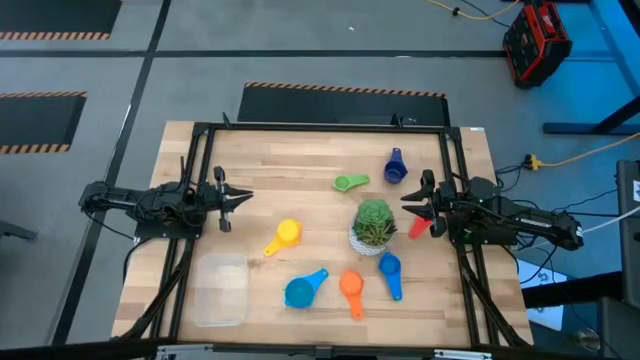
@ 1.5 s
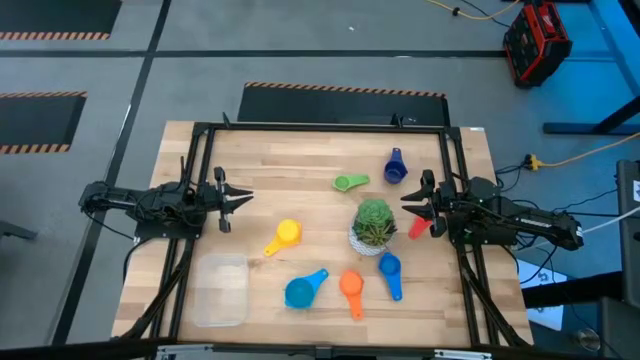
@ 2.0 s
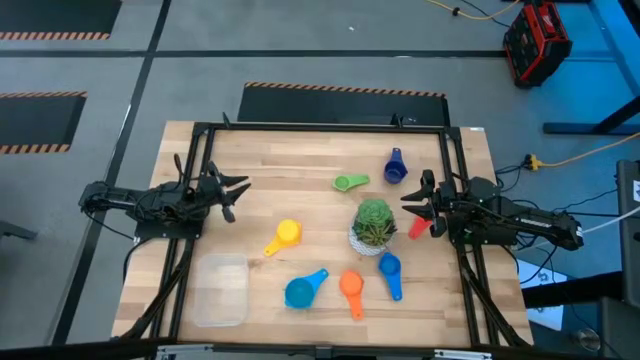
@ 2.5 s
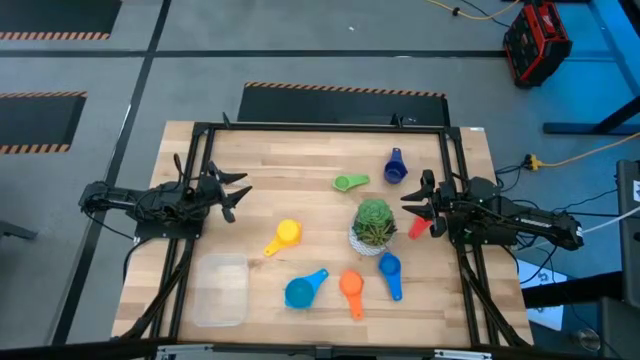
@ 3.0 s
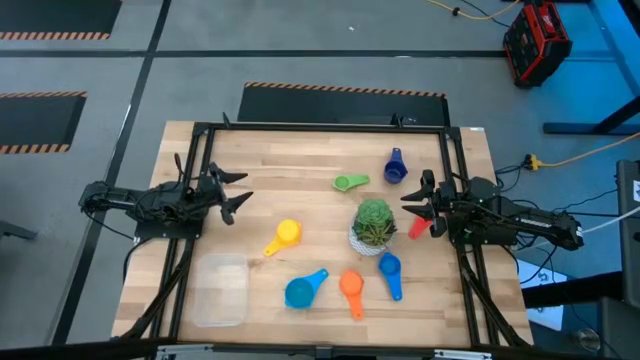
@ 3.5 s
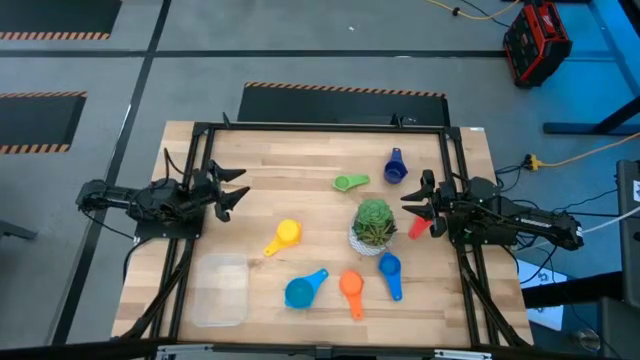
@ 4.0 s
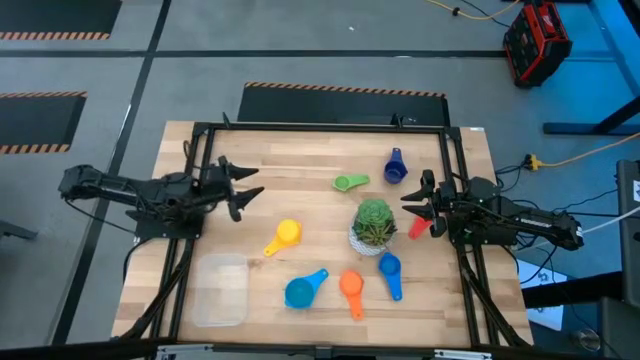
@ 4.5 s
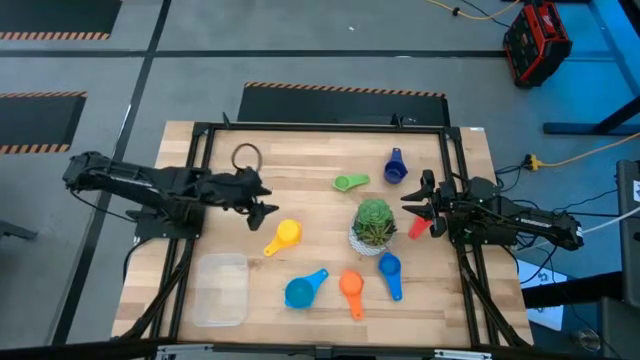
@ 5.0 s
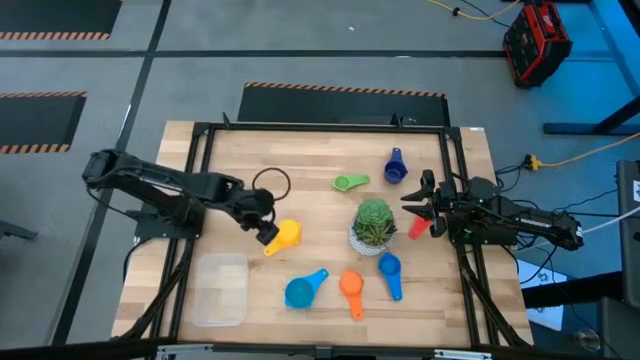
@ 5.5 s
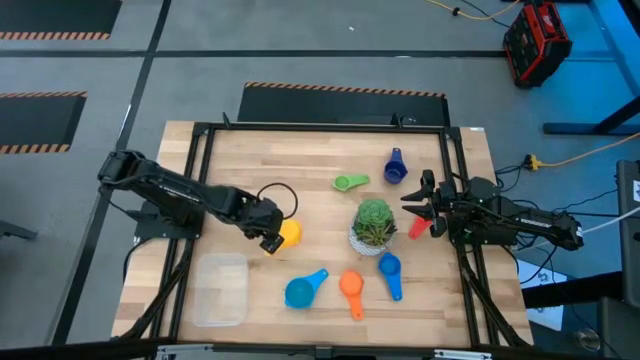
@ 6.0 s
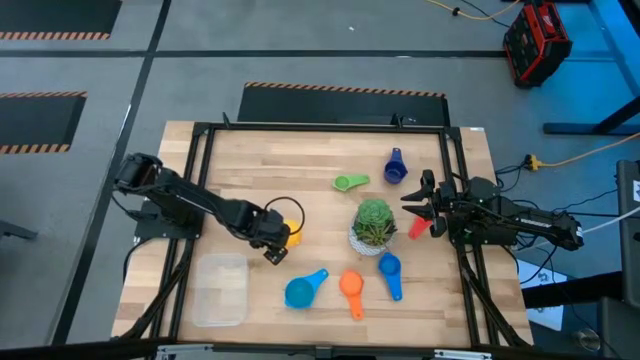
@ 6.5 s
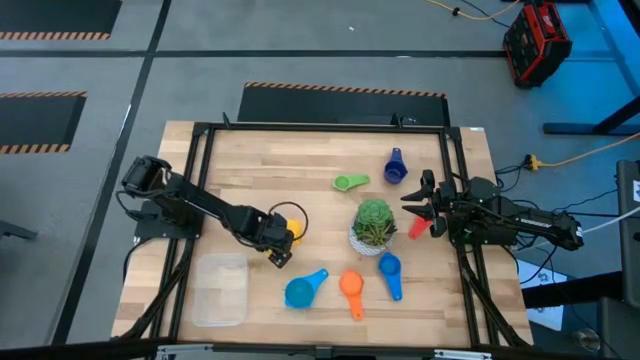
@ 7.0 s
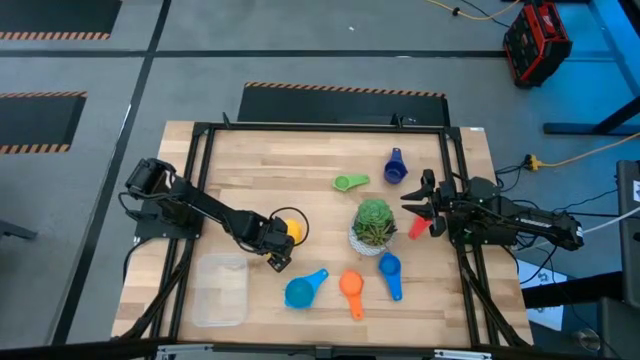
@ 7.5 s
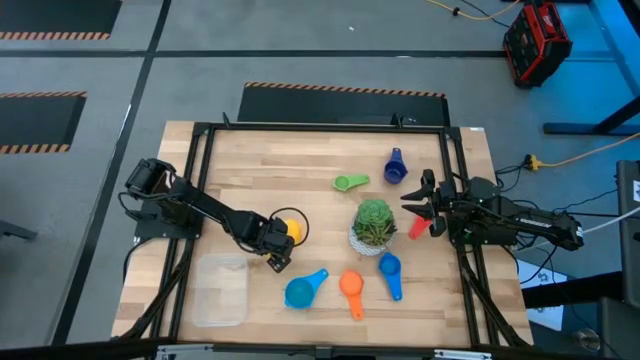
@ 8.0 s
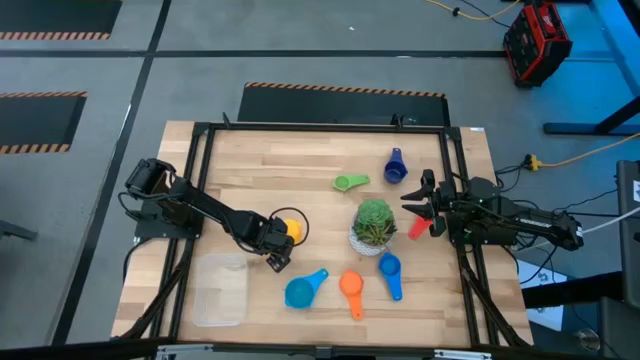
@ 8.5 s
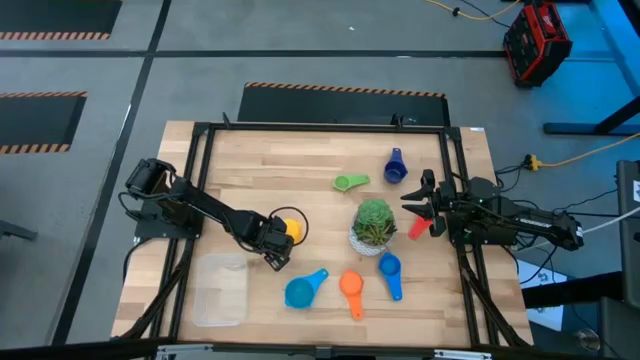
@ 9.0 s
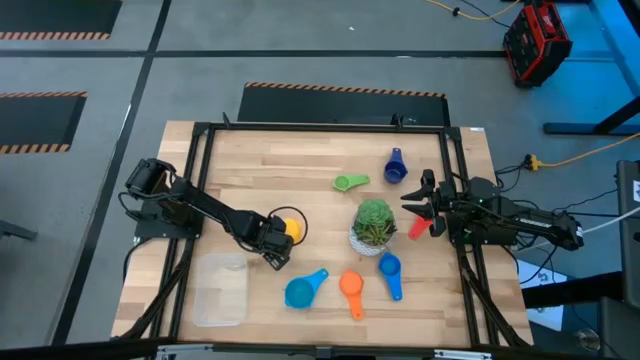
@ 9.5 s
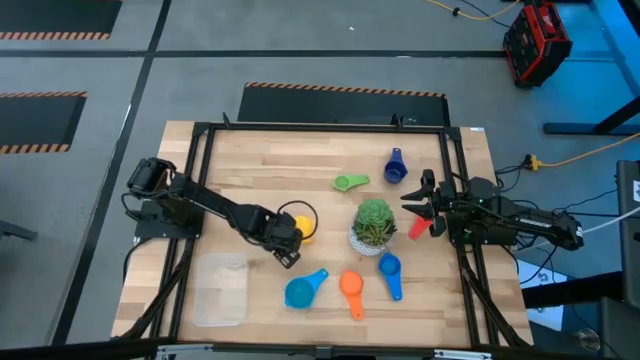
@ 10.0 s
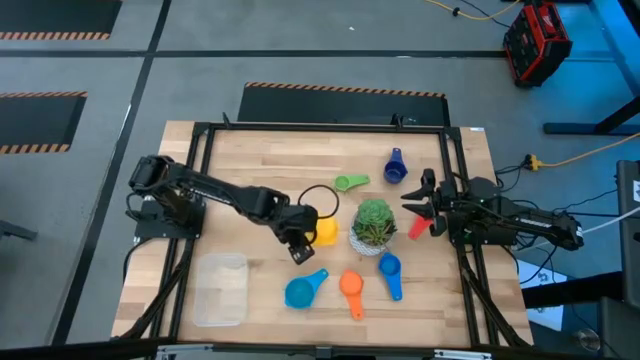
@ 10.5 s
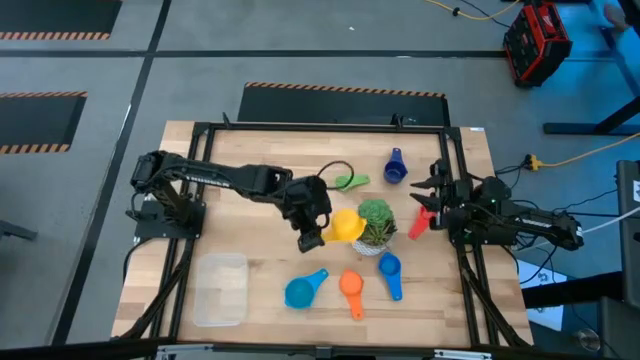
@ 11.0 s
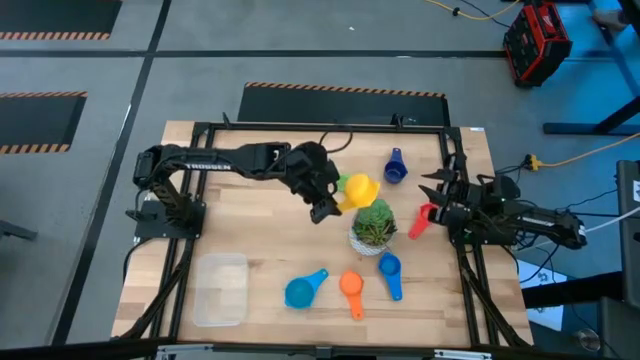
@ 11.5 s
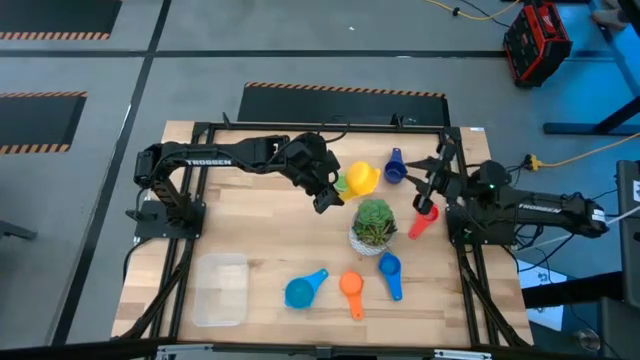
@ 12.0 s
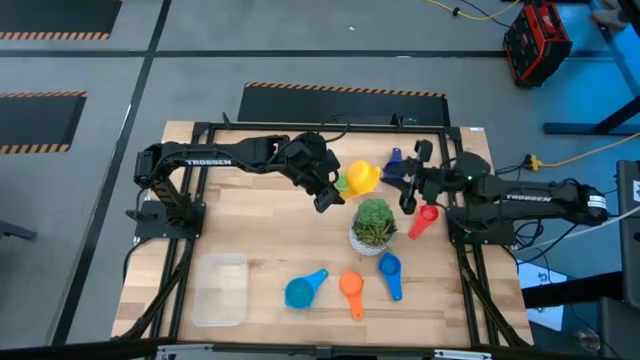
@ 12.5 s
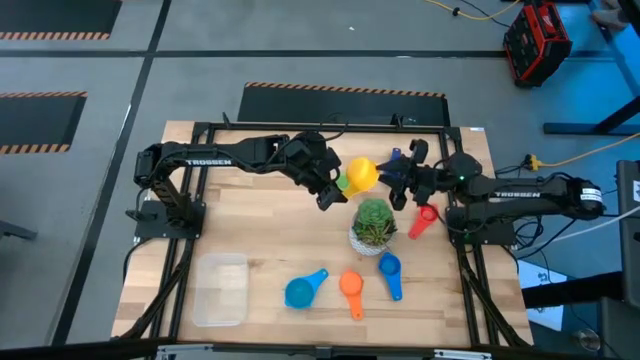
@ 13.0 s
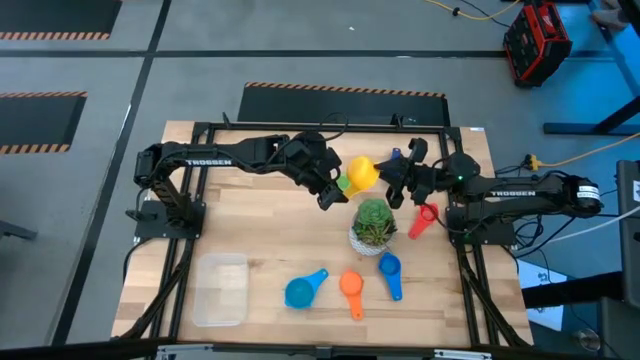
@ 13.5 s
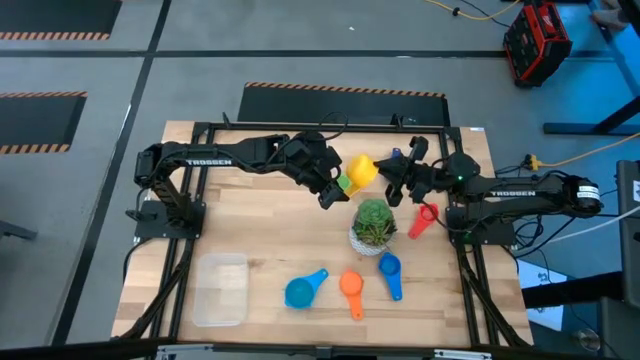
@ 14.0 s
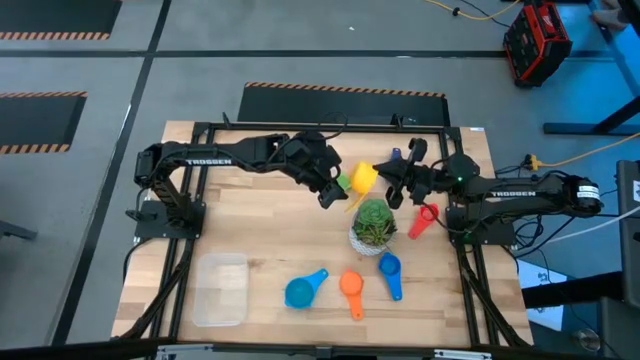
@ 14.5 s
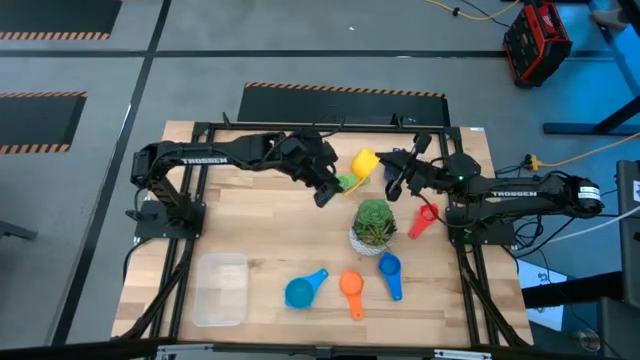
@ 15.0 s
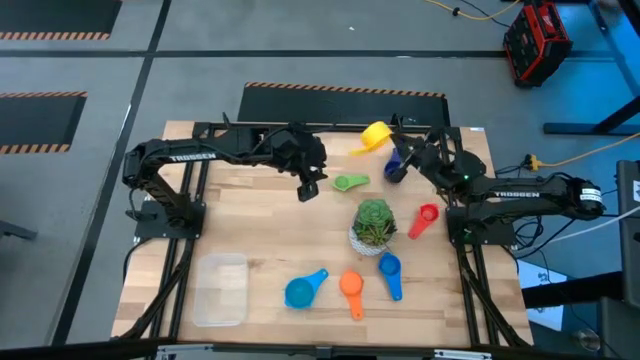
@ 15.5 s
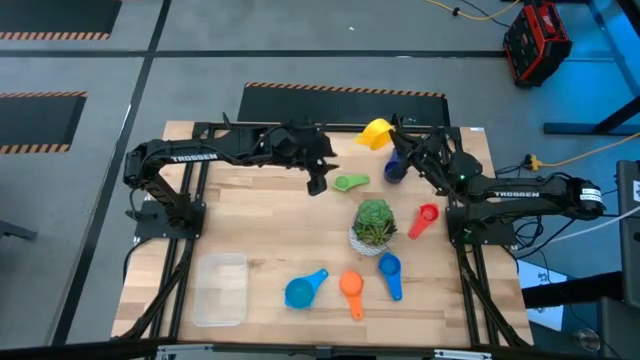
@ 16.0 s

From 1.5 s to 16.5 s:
Task: Nest measuring cups in basket
Stack the yellow measuring cup on top of the light blue measuring cup

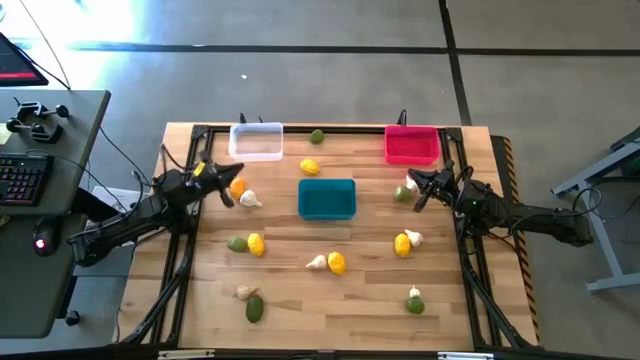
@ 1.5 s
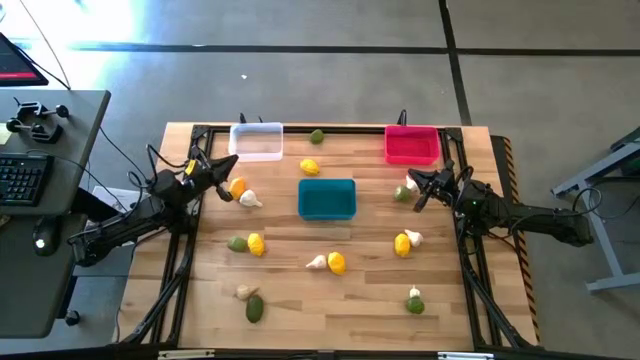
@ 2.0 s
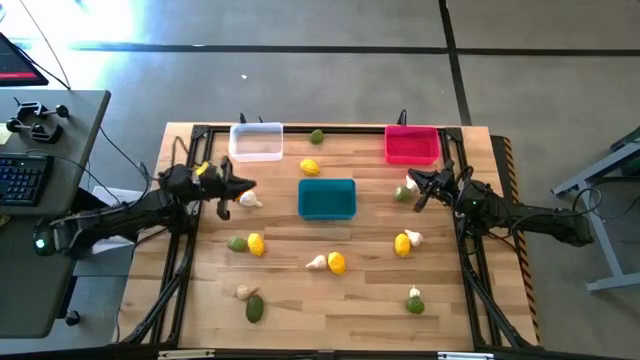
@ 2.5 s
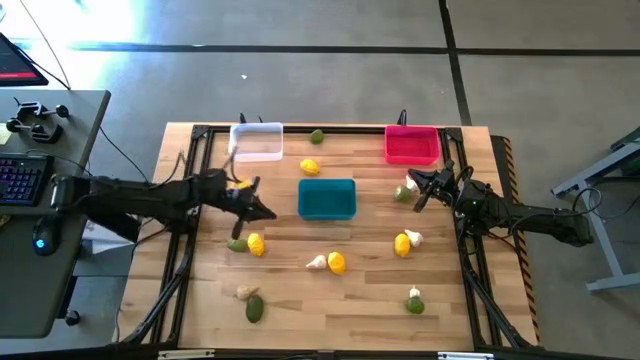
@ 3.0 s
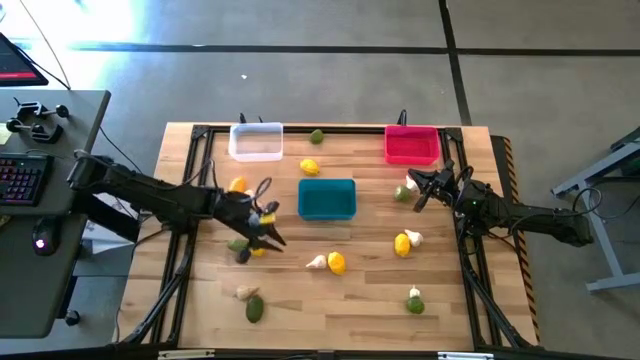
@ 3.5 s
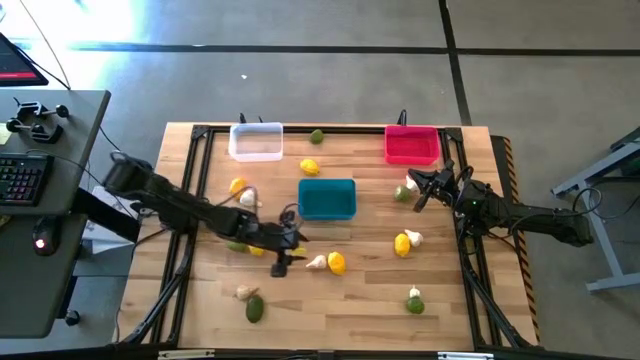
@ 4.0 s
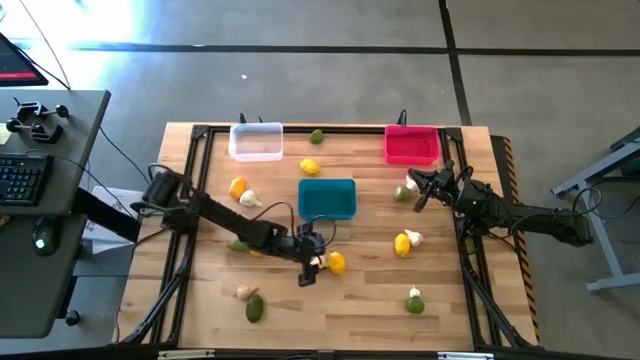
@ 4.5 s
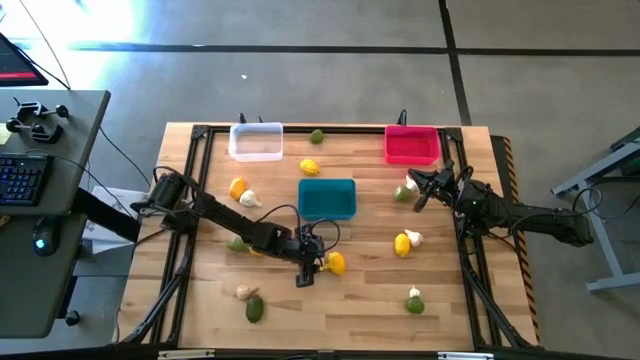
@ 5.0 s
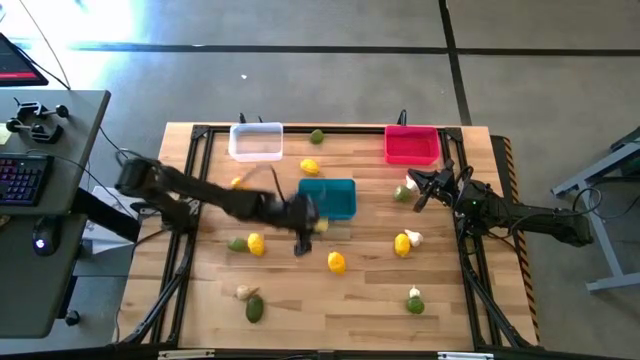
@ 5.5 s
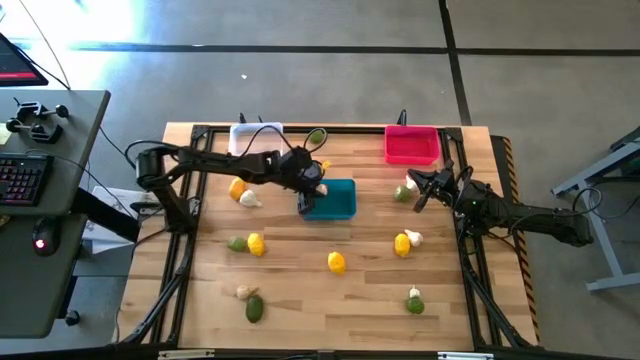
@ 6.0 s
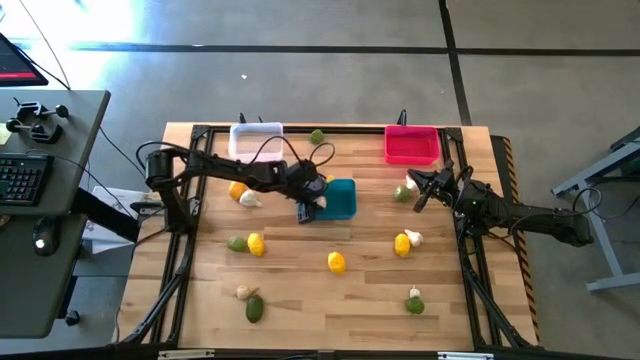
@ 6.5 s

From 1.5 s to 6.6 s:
Task: Sort produce into baskets
Put the garlic into the blue bin

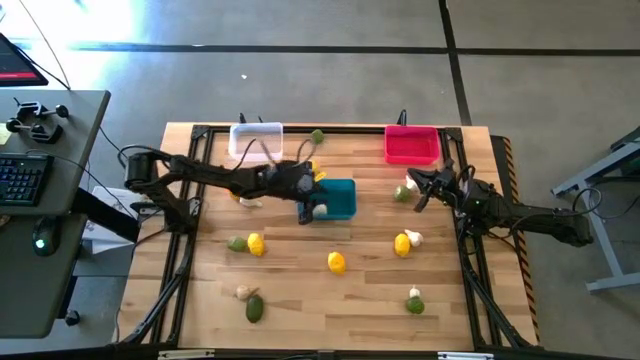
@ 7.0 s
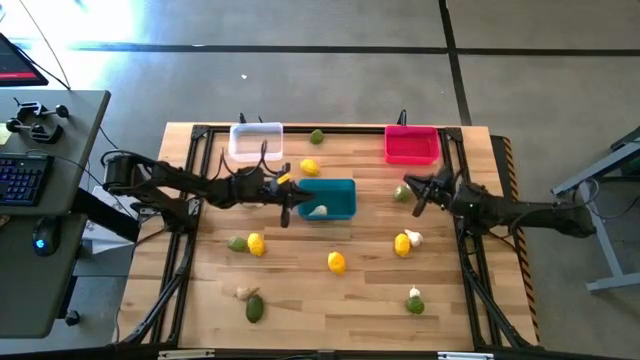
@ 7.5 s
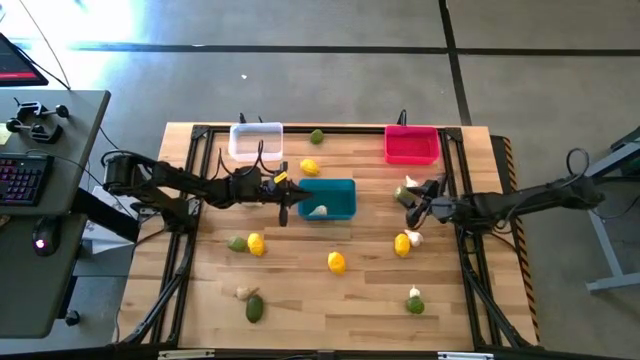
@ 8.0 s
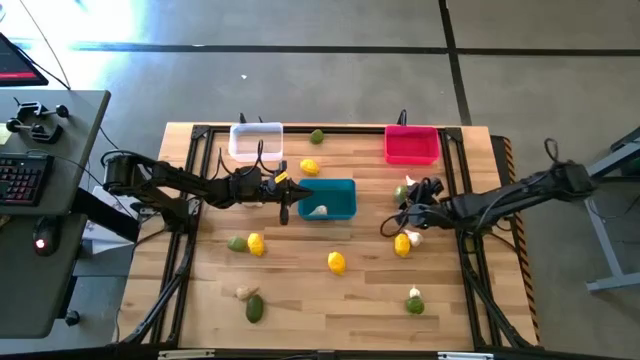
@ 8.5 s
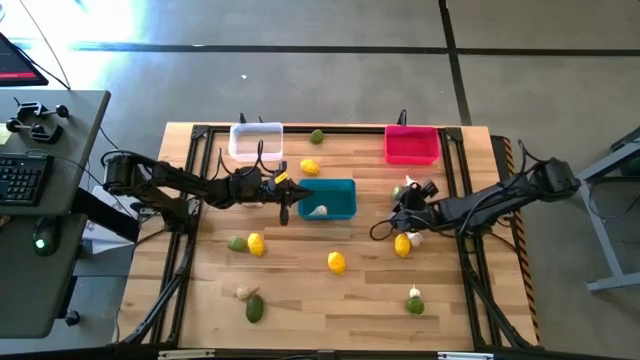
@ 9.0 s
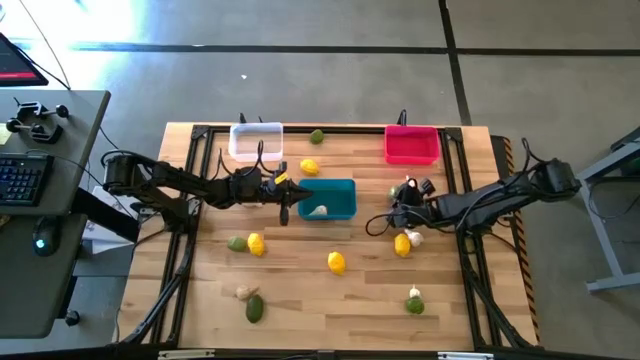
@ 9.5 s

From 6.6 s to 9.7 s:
Put the green lime into the pink bin
